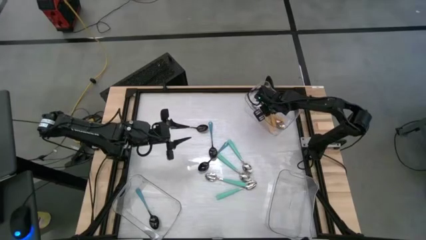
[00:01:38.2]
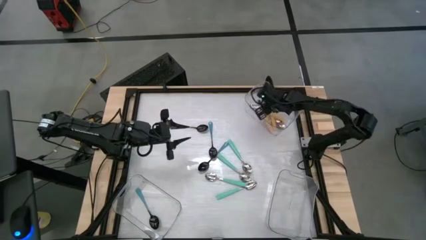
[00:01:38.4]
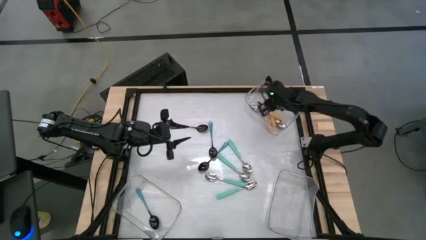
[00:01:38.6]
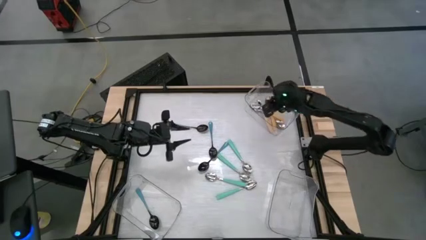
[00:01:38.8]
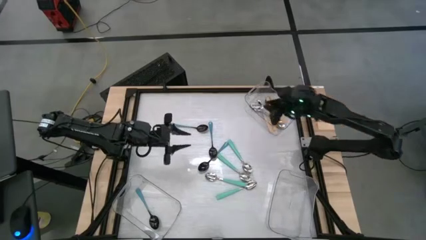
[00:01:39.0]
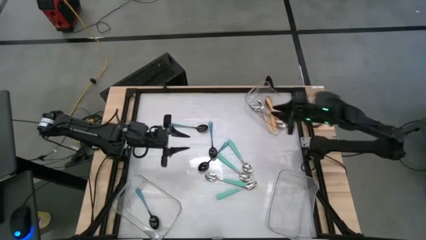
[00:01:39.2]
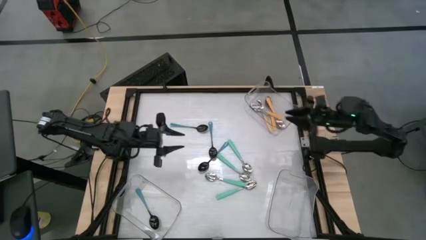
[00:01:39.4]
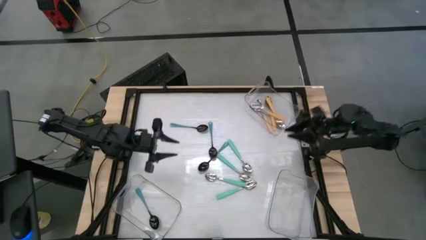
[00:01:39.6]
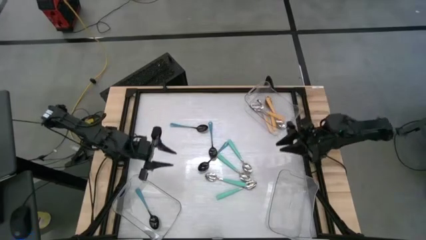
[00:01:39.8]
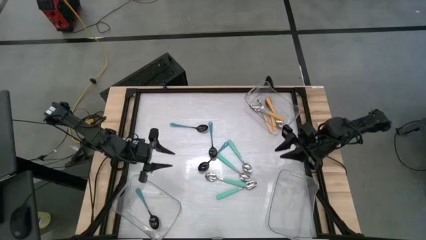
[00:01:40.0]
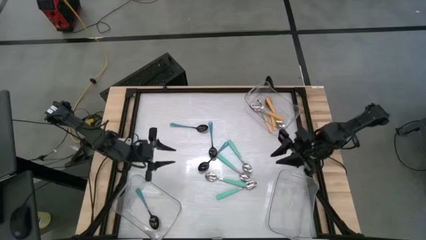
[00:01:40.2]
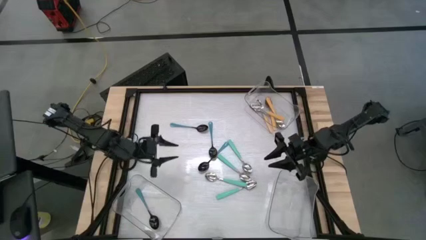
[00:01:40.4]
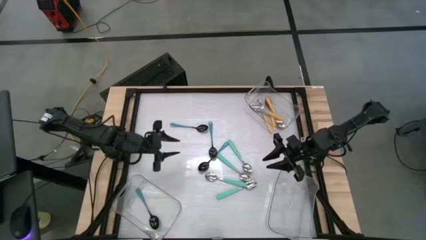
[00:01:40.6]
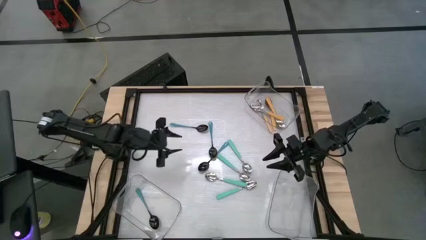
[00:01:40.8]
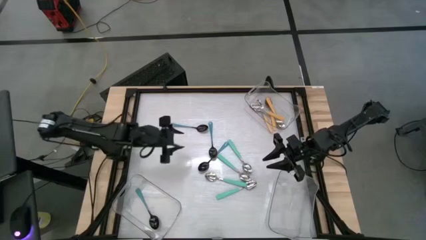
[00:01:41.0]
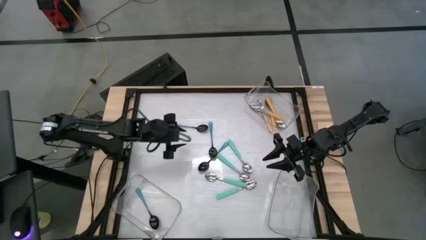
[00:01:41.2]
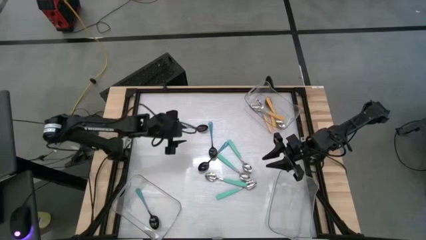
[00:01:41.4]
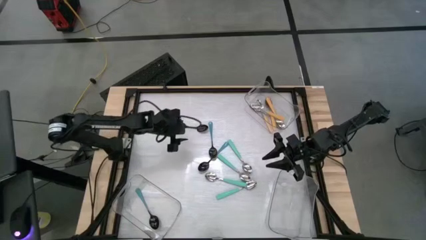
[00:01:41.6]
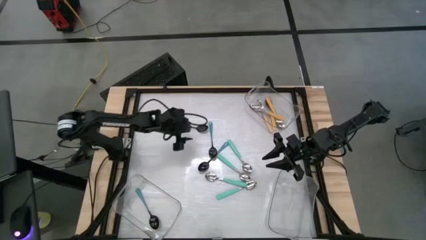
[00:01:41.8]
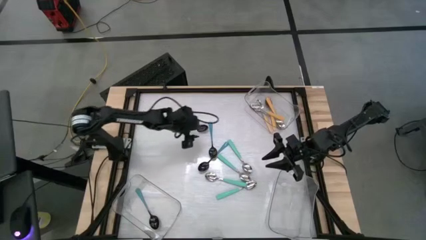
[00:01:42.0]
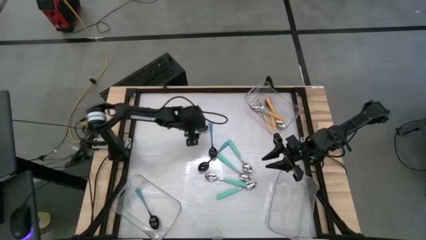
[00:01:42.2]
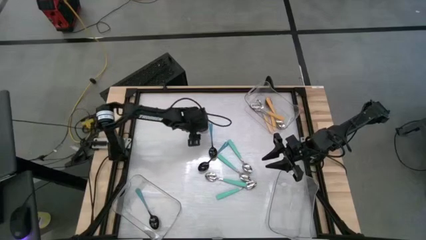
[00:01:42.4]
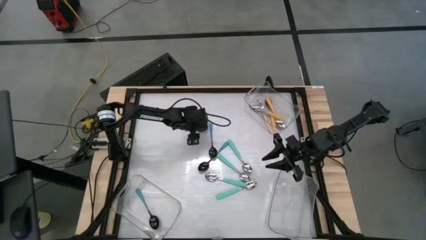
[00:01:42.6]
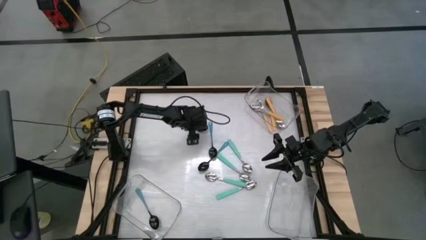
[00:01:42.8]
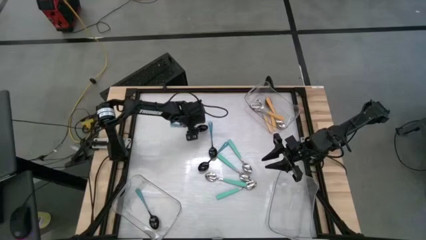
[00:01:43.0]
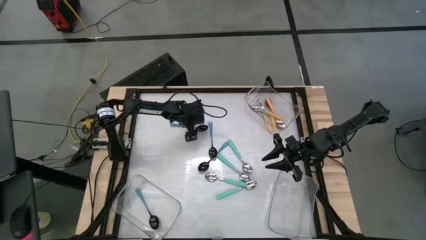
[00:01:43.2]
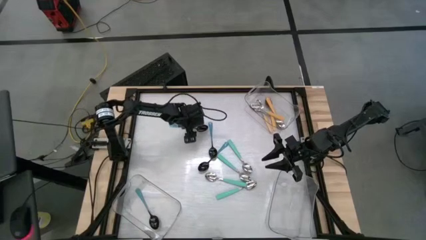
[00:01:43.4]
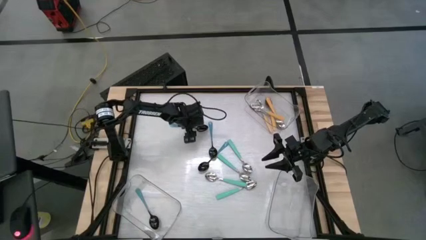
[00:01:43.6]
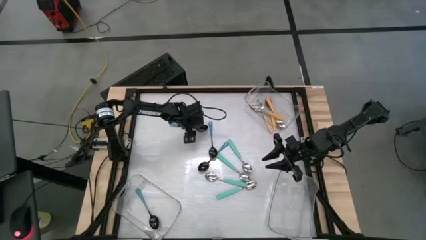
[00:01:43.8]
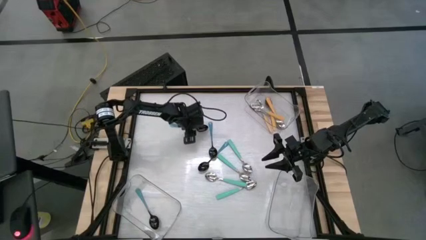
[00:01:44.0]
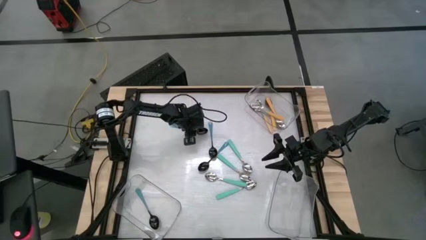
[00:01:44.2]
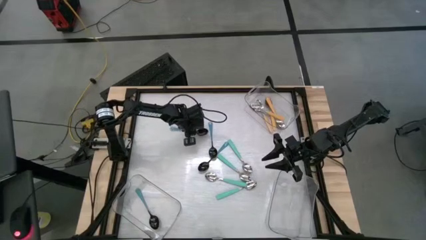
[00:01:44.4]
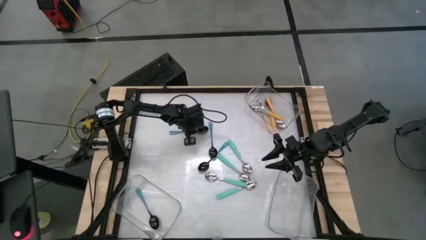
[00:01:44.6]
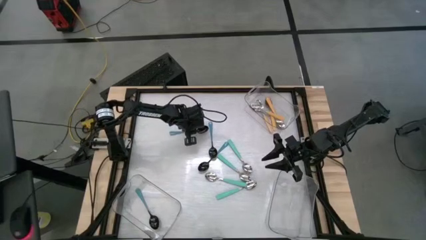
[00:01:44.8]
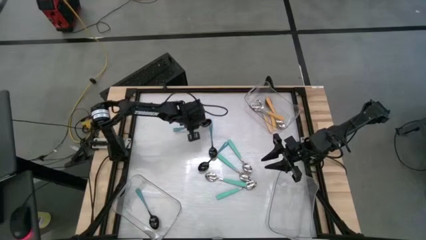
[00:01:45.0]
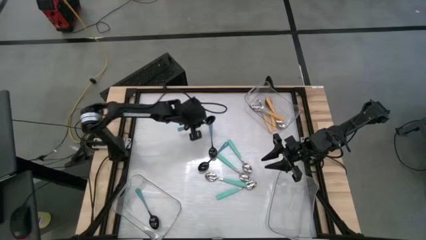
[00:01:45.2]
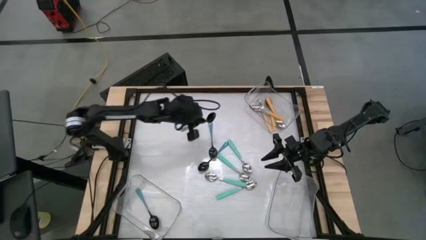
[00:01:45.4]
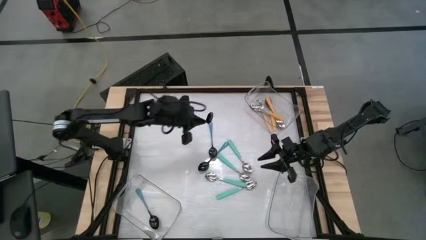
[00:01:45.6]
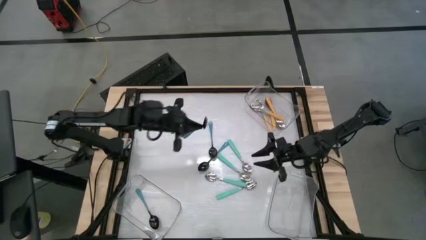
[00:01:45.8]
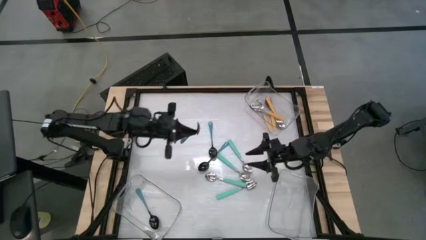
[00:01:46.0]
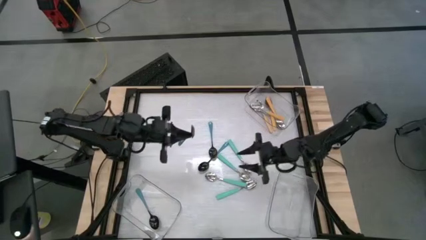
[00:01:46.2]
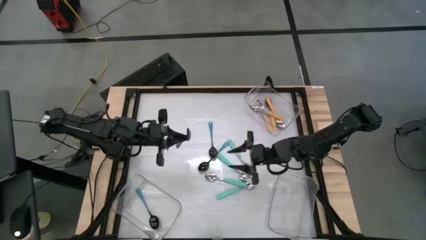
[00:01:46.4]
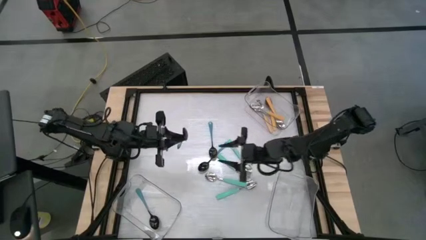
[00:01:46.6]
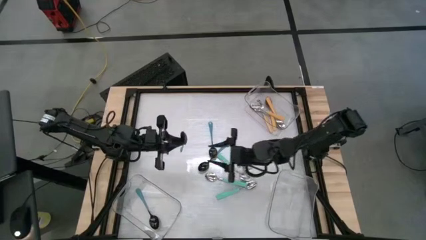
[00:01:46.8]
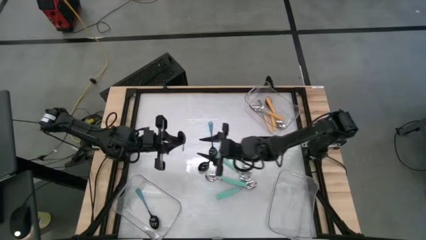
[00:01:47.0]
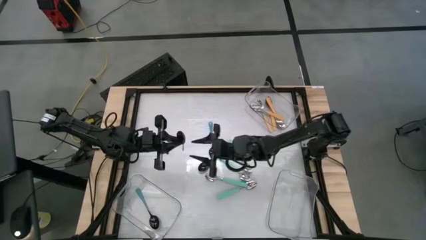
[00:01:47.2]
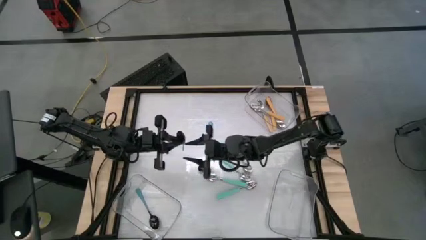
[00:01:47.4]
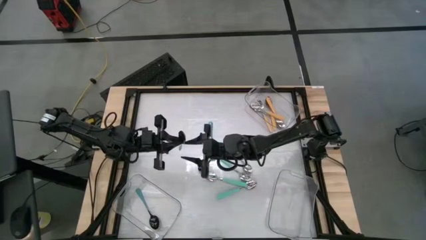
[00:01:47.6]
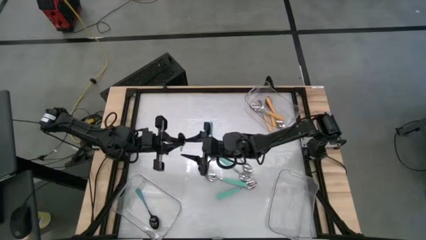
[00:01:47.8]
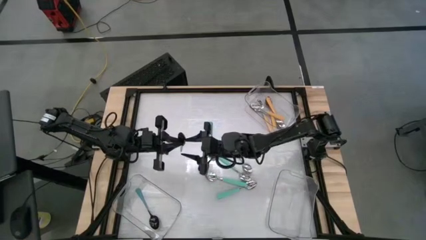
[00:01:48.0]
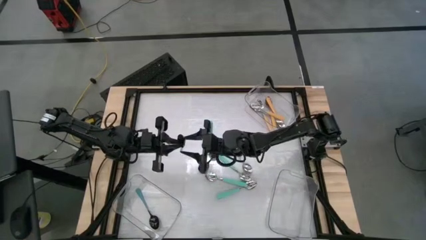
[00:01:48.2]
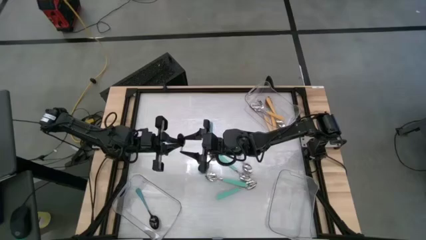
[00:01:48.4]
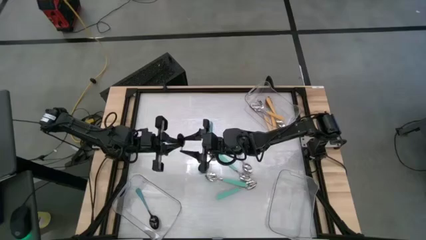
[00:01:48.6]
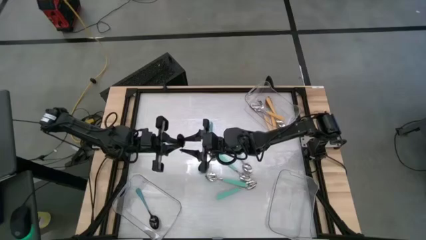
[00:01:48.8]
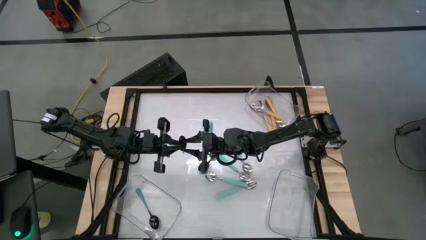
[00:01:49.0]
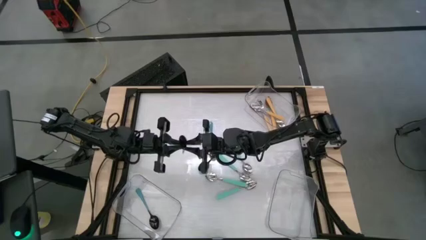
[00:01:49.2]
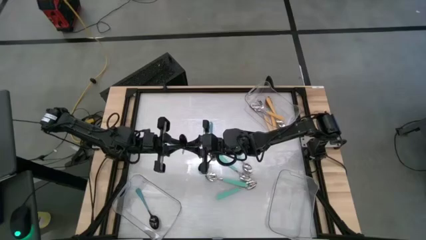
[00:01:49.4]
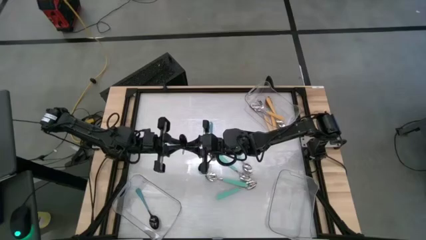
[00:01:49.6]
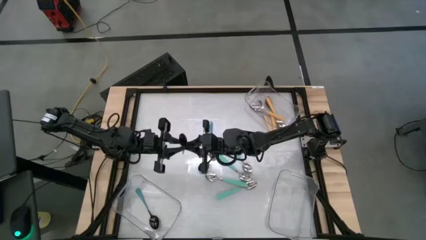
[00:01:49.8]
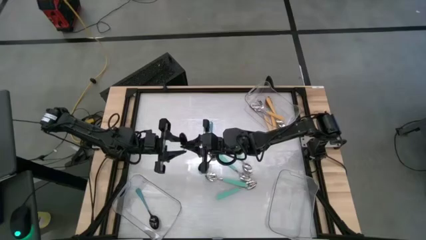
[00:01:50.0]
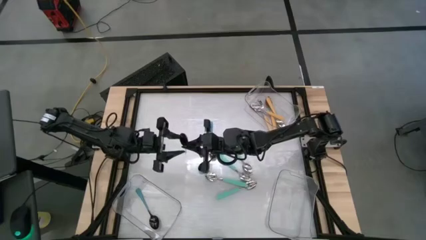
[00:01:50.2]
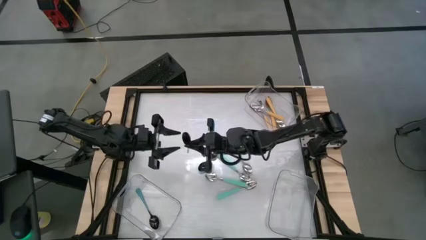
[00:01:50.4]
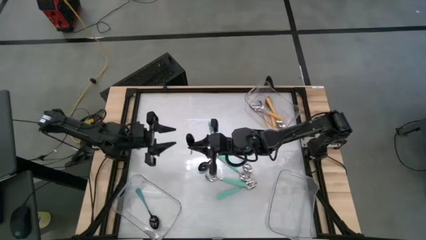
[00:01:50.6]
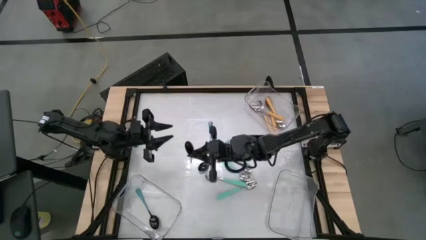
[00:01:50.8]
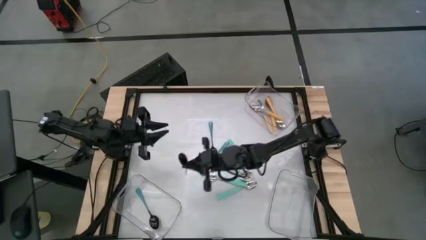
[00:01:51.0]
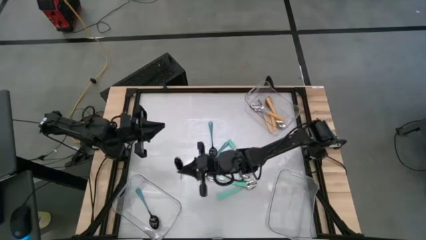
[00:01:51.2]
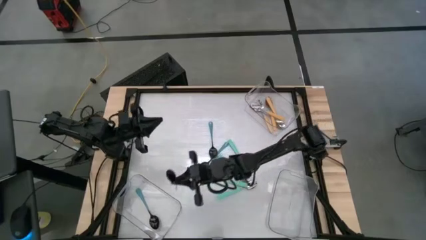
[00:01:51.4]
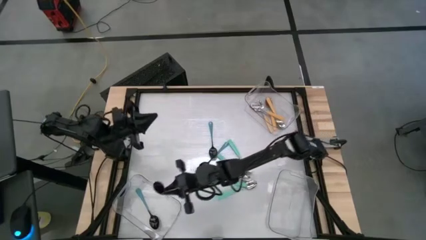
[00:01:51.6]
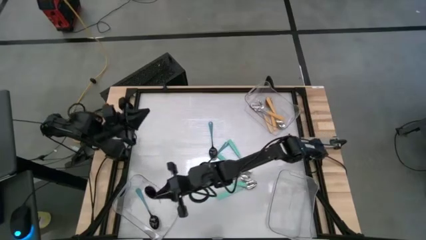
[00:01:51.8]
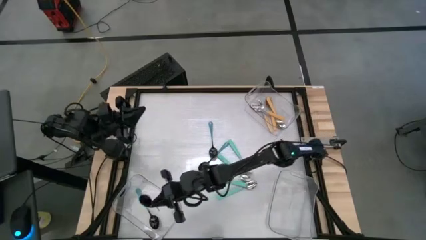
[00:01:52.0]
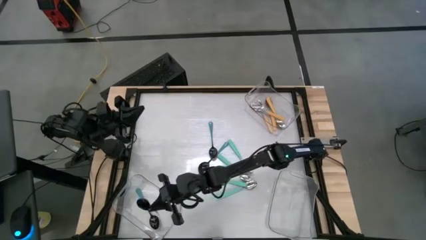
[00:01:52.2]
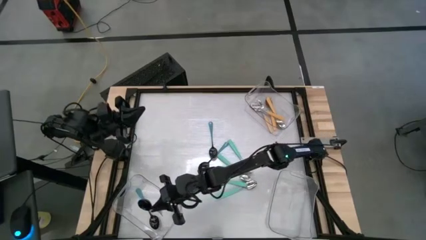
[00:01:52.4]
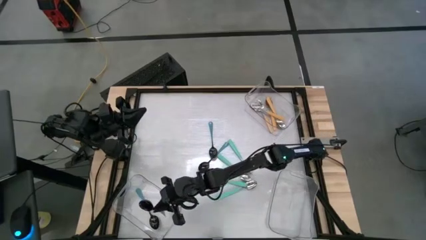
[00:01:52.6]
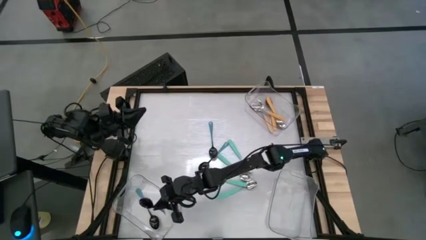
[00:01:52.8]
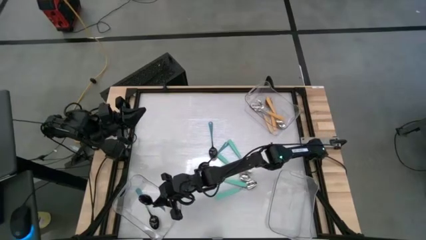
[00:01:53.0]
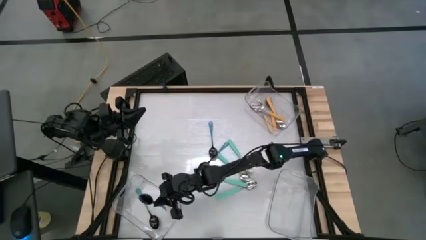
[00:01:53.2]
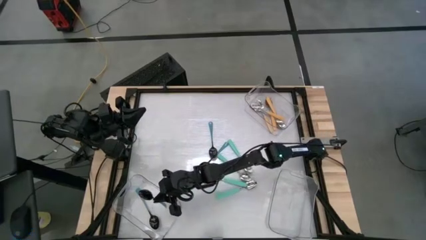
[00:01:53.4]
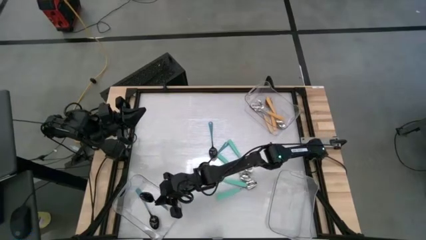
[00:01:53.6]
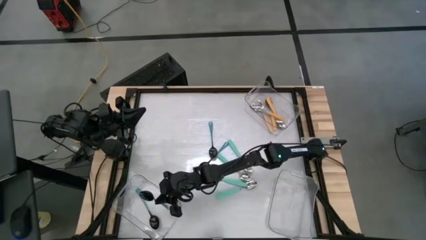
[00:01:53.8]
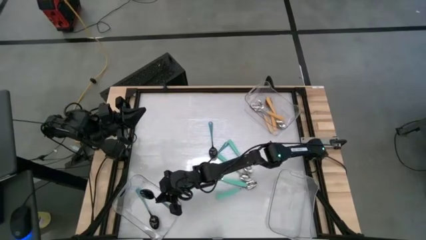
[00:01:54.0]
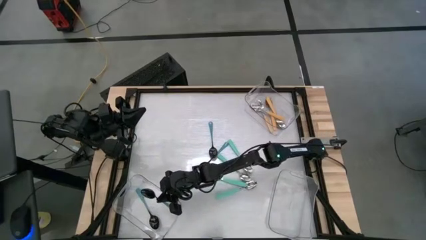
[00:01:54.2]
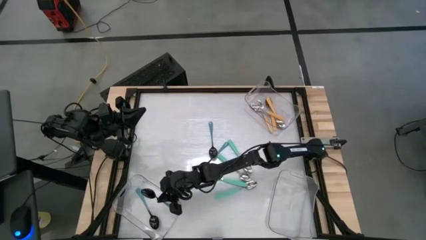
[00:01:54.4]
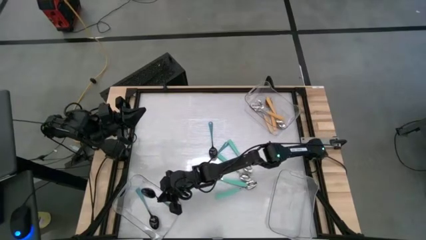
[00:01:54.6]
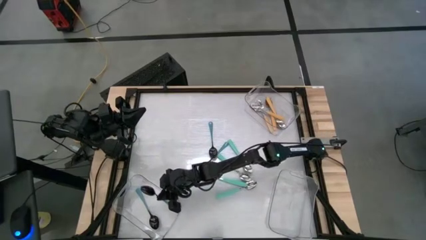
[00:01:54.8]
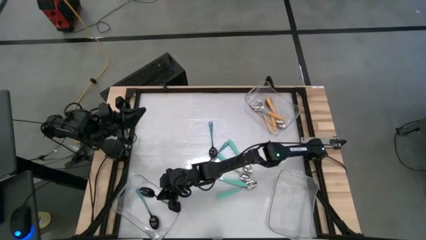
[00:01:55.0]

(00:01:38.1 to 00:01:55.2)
Task: Sort silverware by color (type)
Put the blue spoon into the bottom left transparent bin
